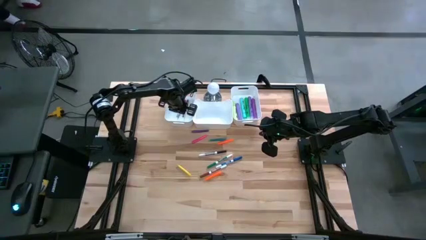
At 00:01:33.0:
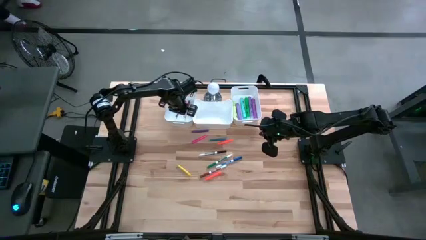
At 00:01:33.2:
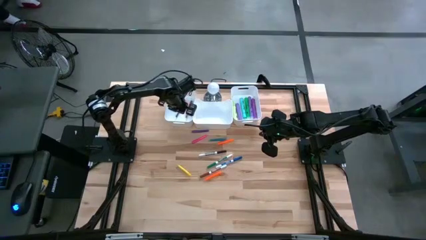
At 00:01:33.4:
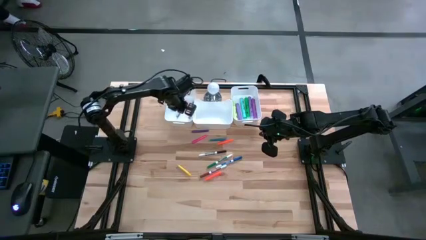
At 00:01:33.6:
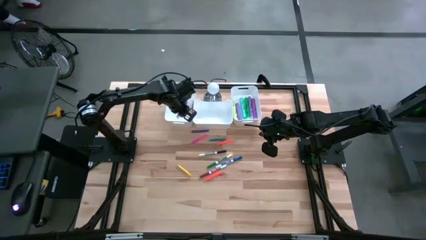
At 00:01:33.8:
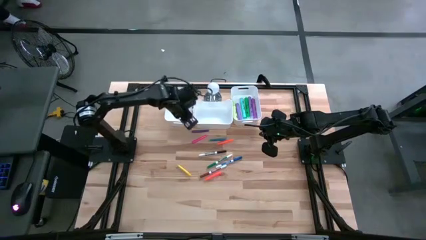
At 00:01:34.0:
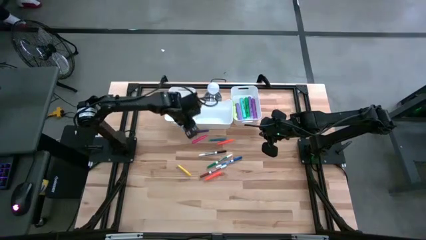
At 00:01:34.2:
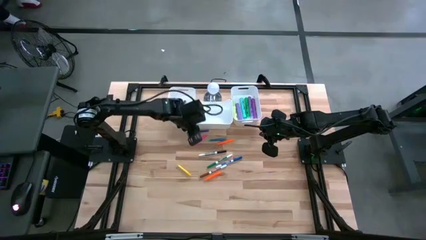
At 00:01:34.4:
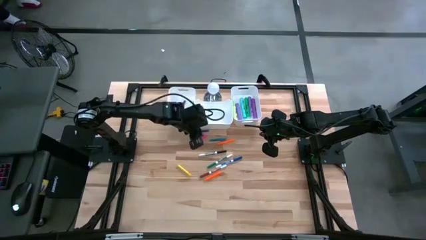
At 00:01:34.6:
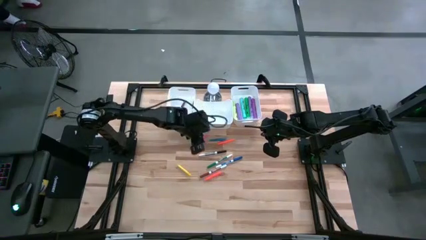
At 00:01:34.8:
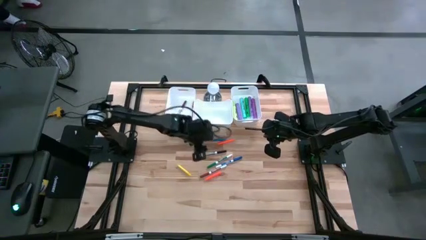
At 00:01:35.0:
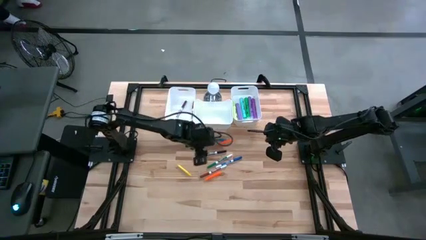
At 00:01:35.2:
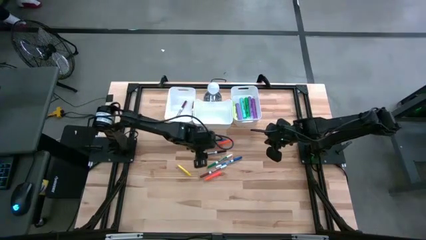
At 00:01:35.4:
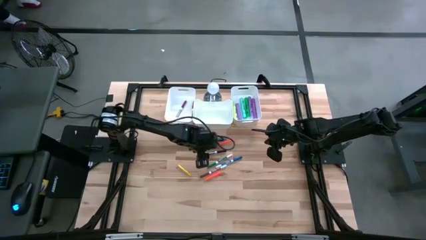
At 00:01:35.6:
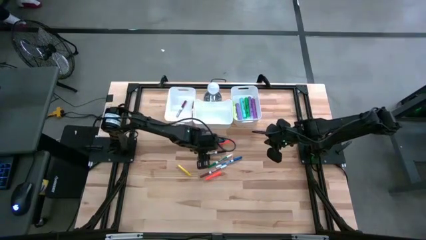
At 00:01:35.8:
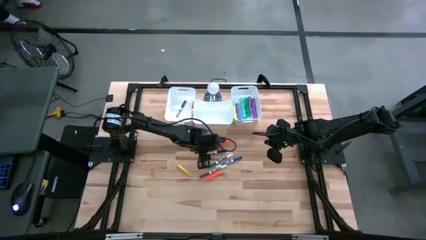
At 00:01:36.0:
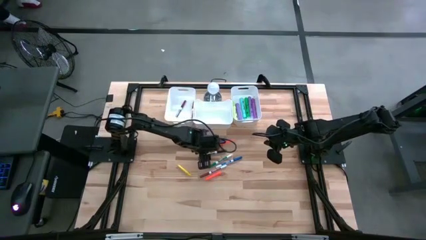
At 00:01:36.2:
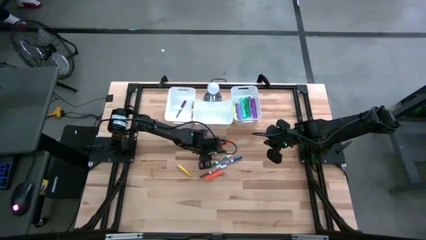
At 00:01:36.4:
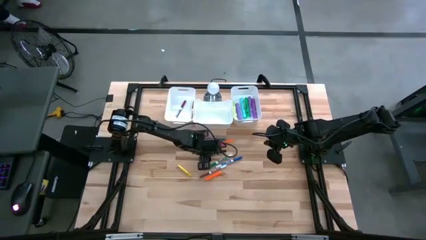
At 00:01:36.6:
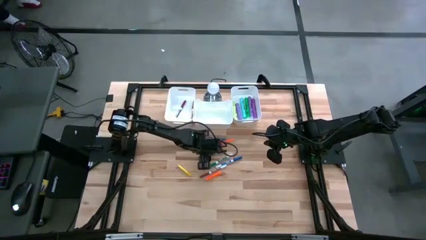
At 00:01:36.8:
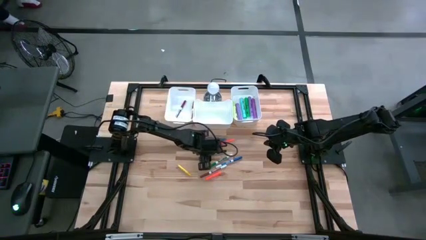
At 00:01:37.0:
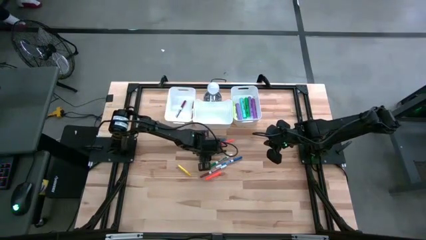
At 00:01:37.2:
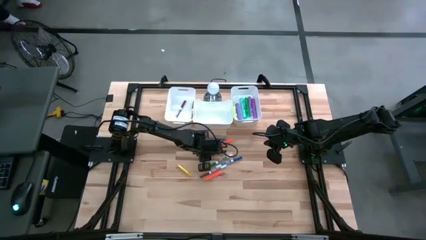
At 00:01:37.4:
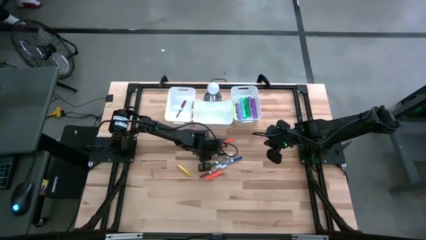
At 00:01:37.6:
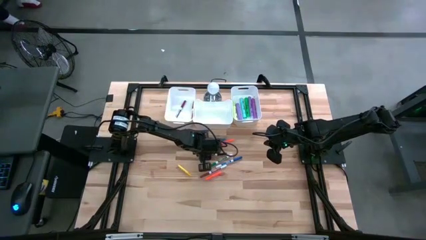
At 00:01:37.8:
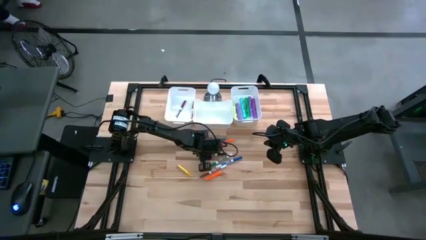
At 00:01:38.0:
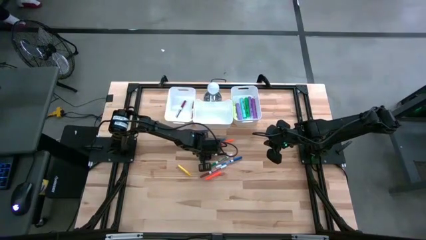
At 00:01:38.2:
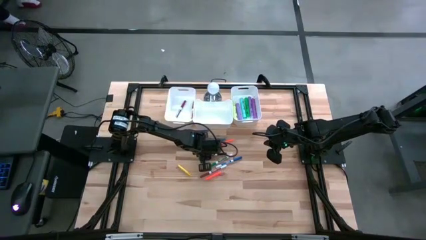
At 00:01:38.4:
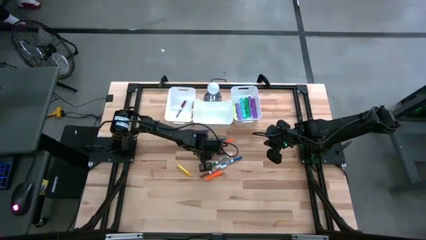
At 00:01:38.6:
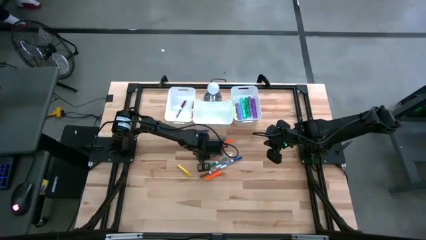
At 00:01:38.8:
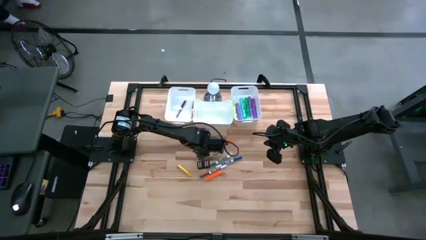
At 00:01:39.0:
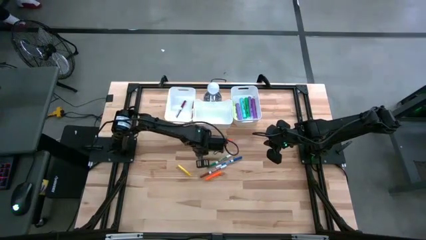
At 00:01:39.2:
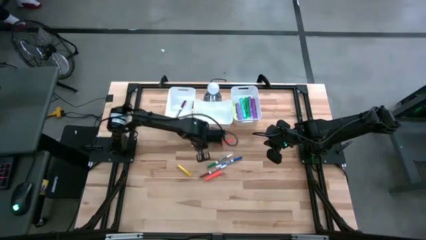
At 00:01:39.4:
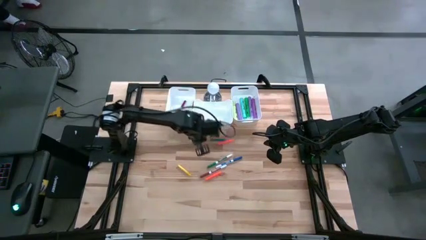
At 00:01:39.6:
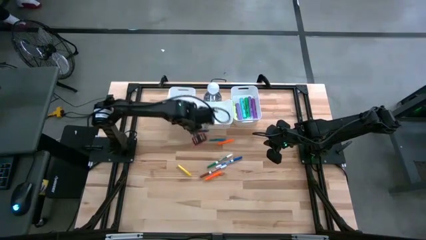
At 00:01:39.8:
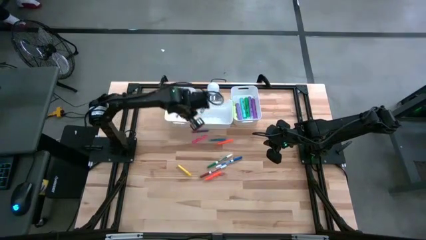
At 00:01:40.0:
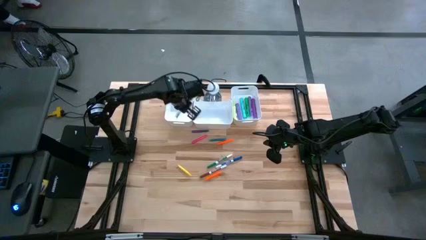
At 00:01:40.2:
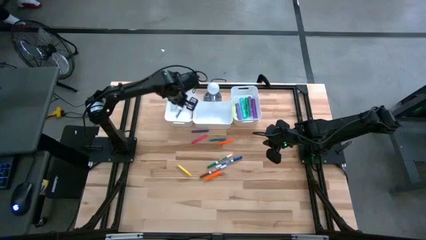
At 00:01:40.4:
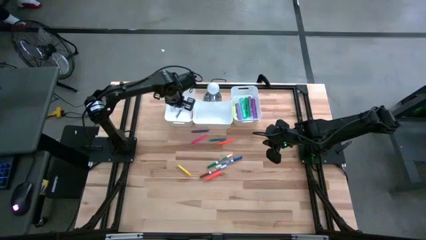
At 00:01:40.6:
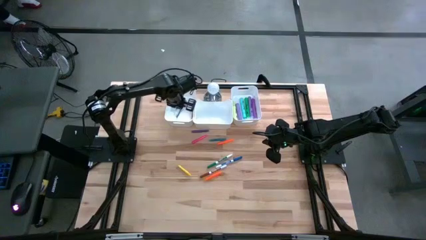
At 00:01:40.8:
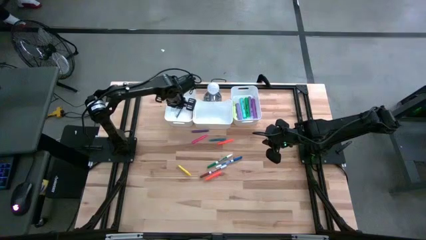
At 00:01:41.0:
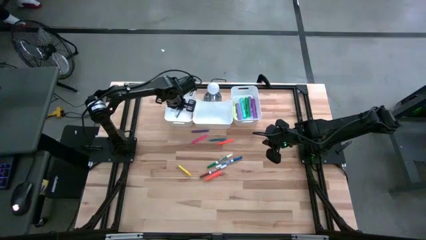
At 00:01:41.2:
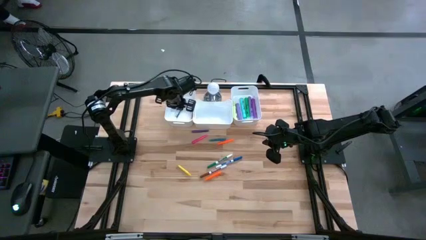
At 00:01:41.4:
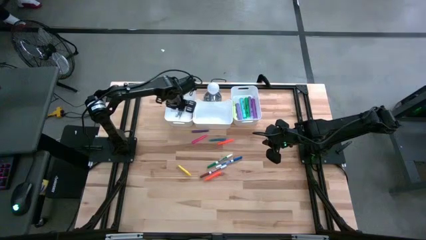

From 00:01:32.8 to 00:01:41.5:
Task: Pick & Place Markers
Put the black marker pen into the left white bin

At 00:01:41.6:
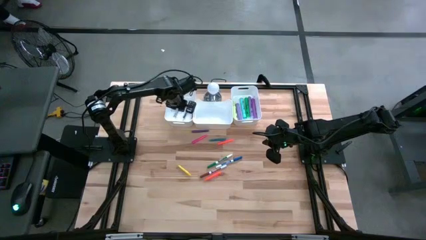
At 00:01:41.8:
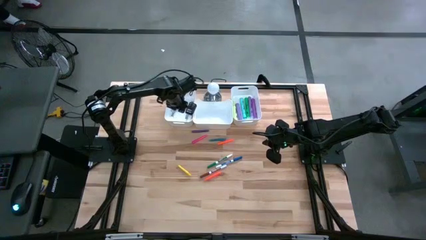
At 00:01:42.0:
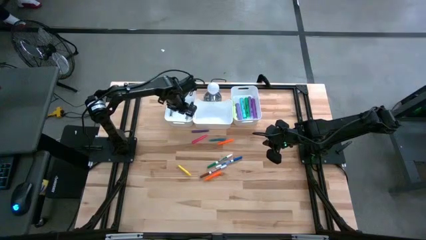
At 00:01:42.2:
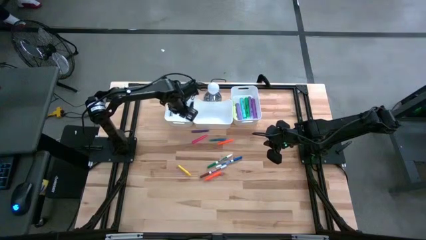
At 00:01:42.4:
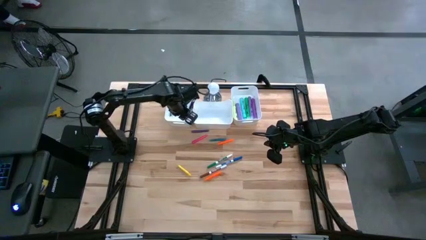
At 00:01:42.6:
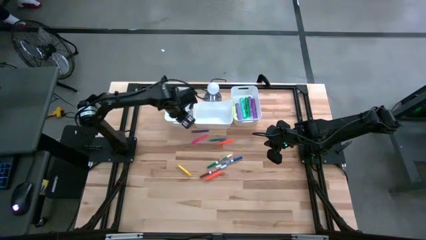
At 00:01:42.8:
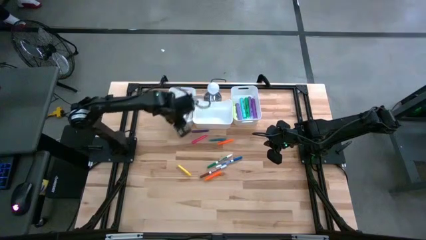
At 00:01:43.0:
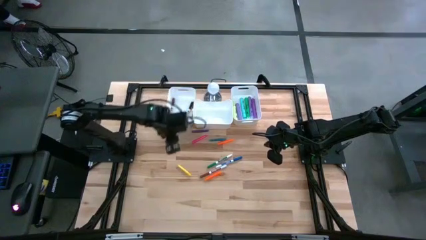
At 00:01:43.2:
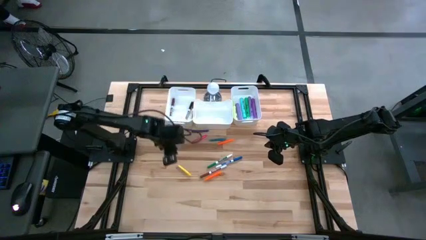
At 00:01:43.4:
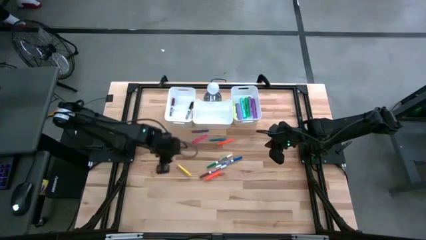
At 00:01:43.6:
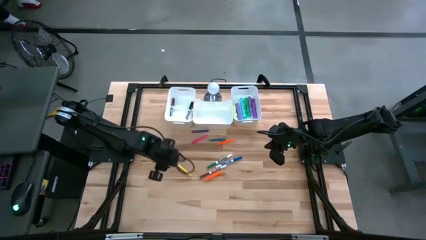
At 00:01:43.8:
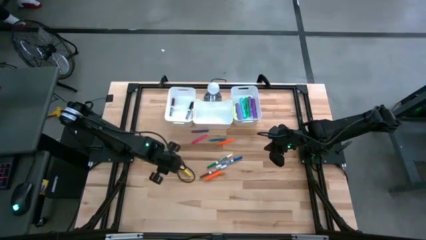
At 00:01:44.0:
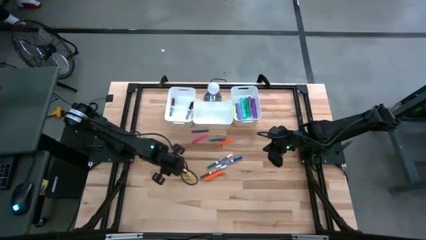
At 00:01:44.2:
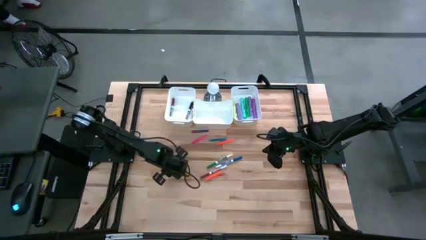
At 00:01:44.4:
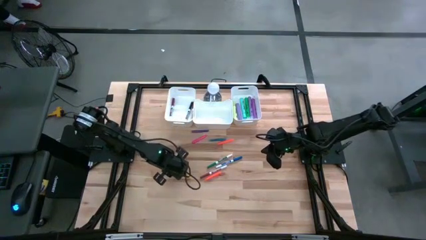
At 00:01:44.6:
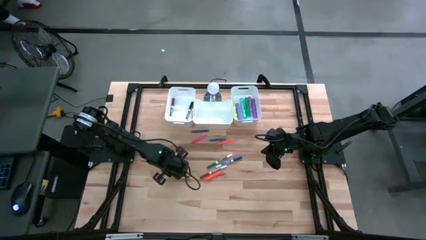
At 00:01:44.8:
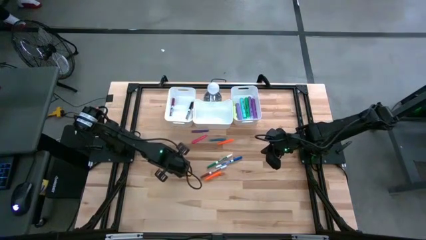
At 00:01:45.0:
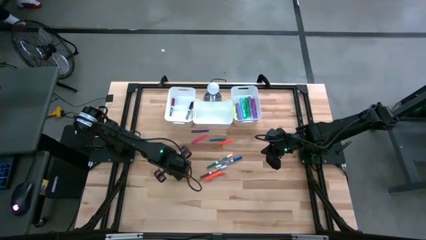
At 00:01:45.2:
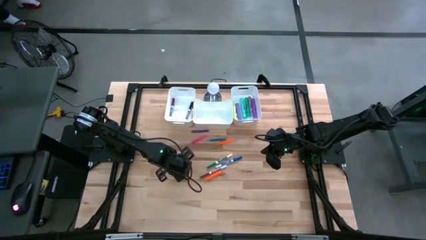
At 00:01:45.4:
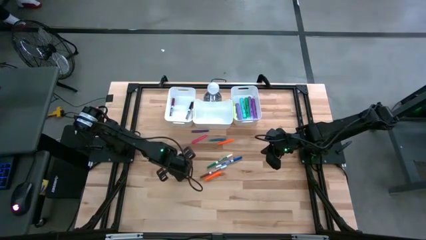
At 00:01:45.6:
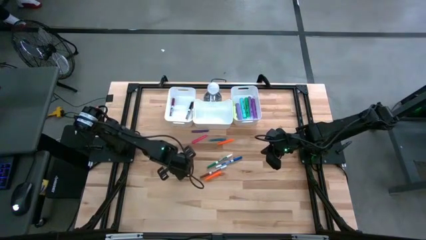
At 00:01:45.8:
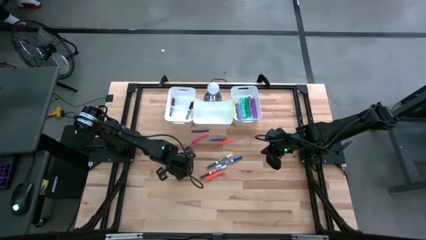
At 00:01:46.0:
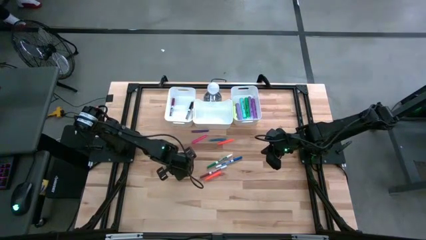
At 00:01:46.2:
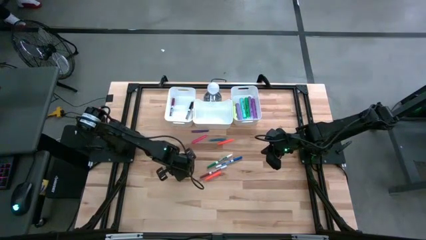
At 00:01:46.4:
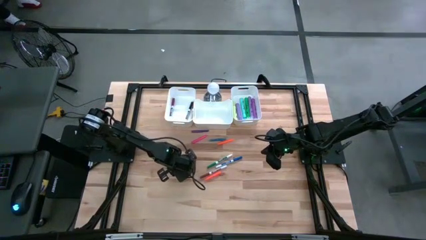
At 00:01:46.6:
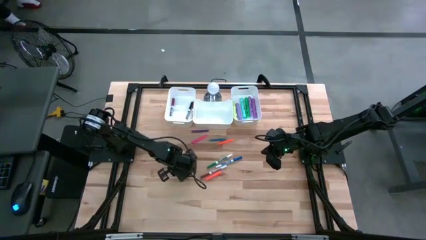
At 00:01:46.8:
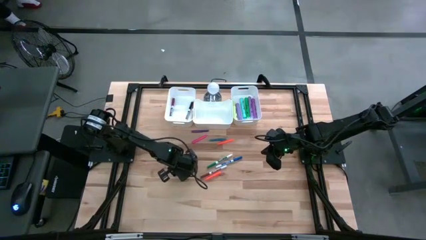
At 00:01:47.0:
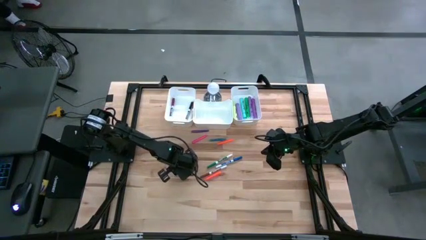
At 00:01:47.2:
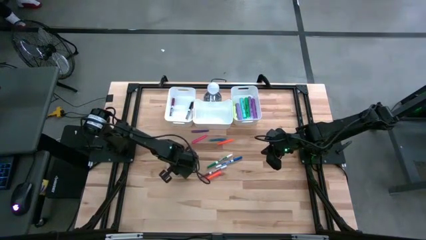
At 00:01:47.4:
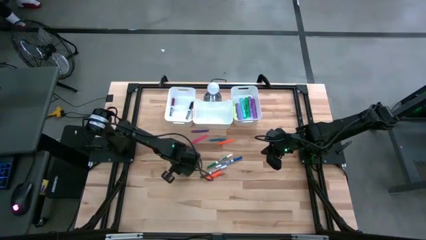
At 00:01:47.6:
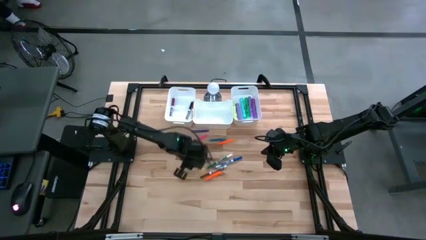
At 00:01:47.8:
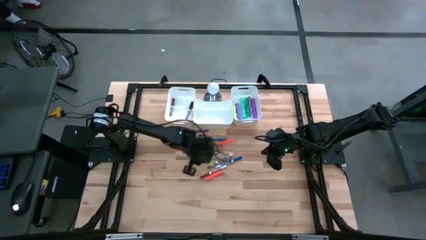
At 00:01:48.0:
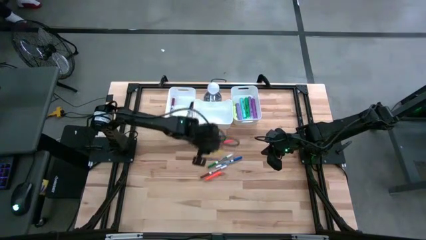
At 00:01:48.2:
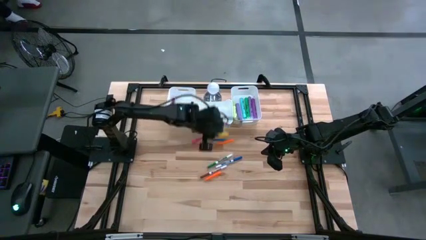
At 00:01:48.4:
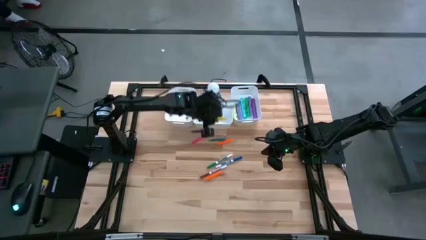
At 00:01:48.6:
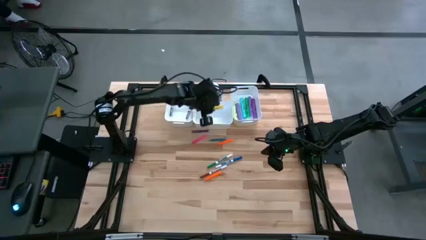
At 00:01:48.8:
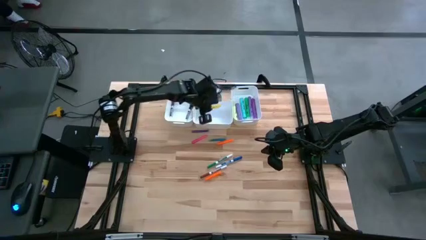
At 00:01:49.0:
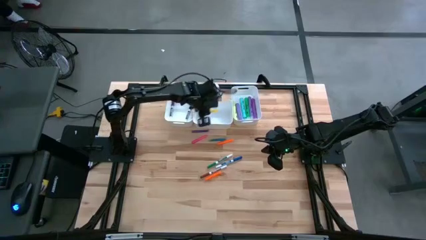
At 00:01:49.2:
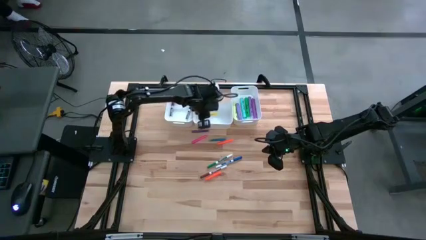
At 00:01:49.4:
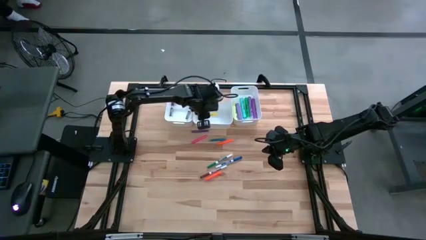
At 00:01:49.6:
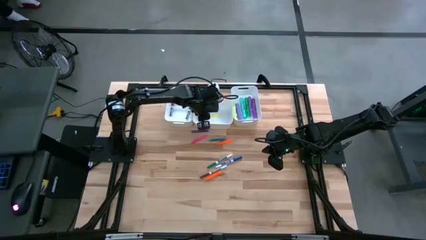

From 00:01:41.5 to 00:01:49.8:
Put the yellow pen into the middle white bin
